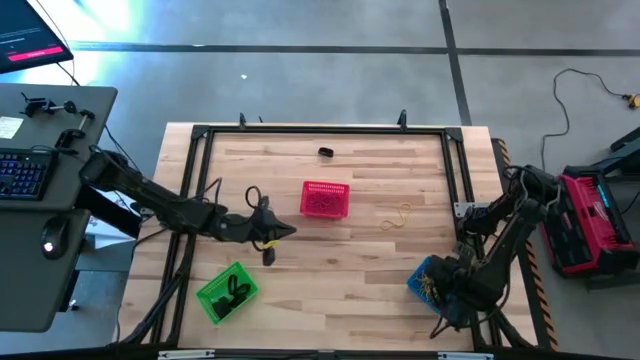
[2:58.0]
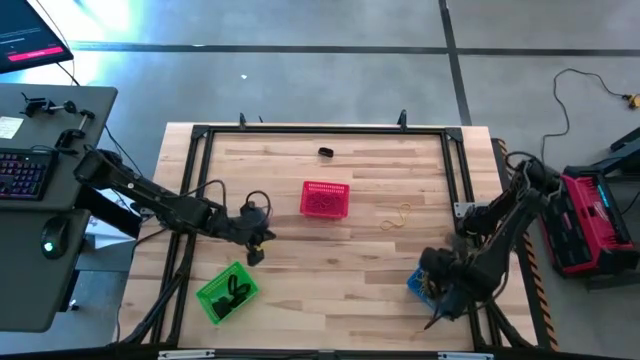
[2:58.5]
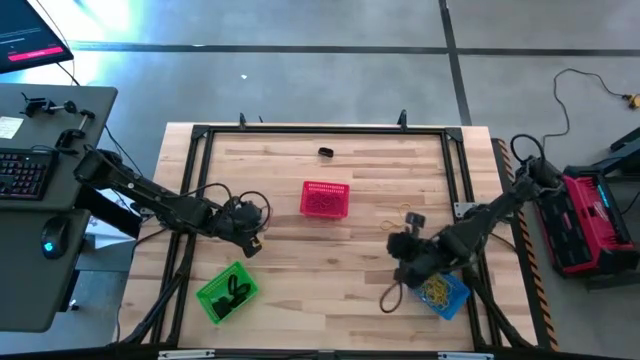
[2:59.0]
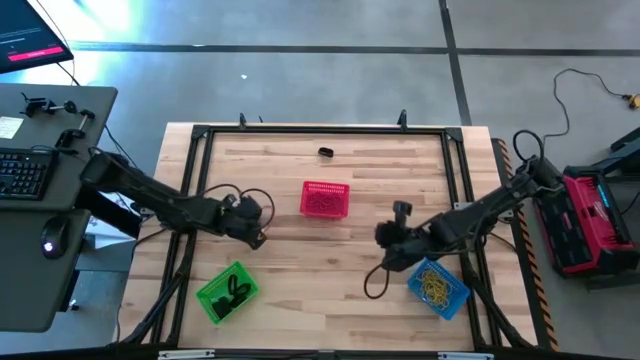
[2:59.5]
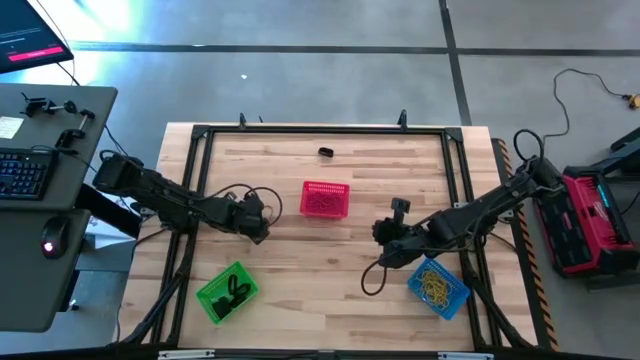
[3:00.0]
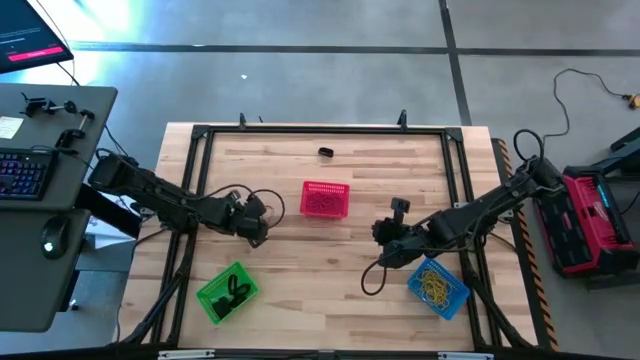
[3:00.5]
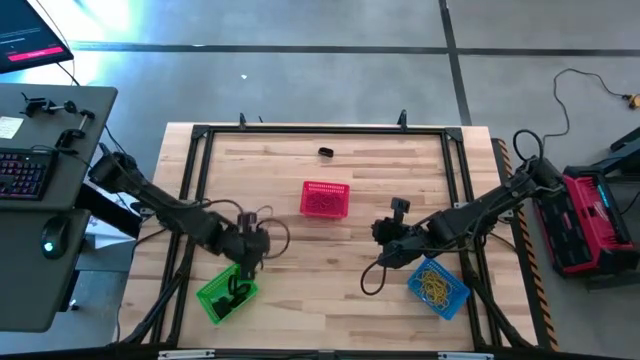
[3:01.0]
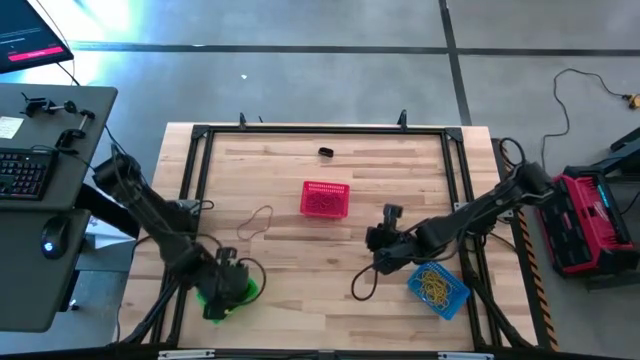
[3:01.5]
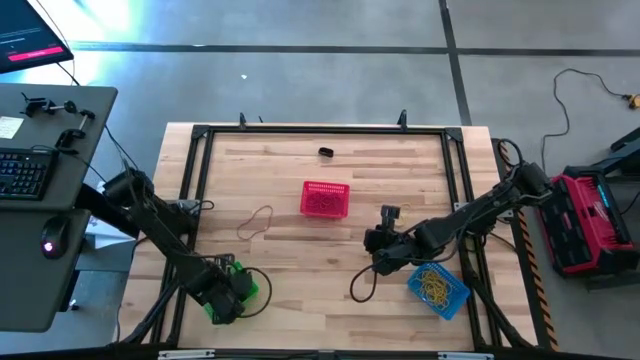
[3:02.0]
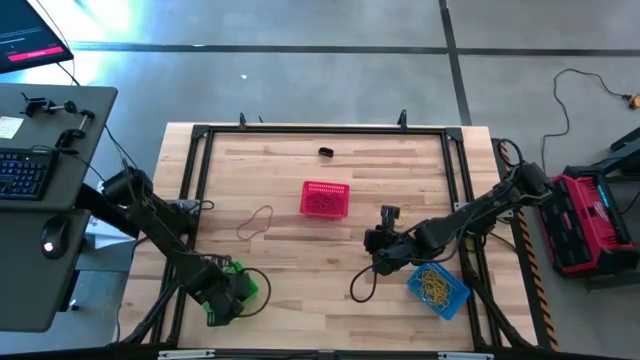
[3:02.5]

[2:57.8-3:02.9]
Task: Sort rubber bands into baskets
Put the black rubber band into the green bin

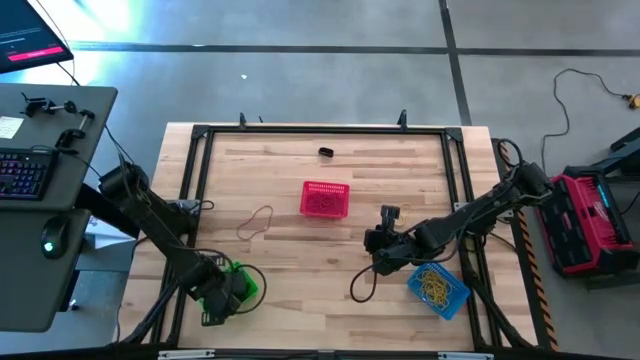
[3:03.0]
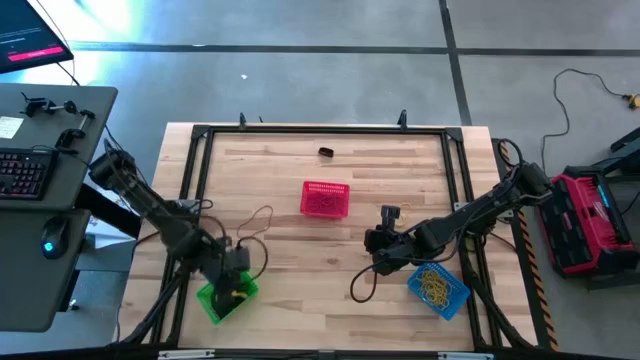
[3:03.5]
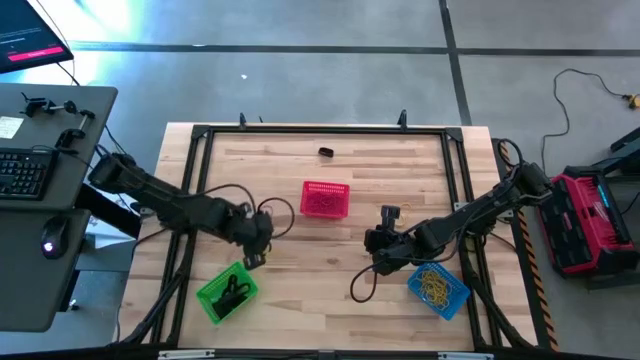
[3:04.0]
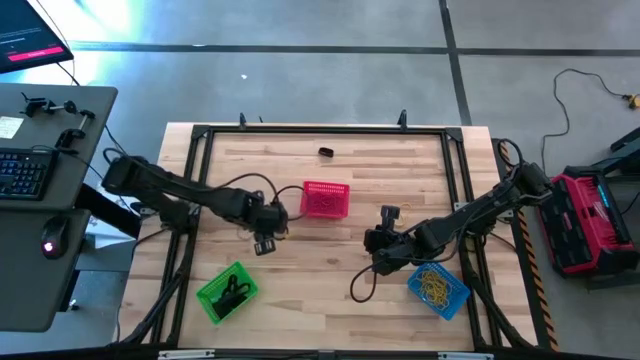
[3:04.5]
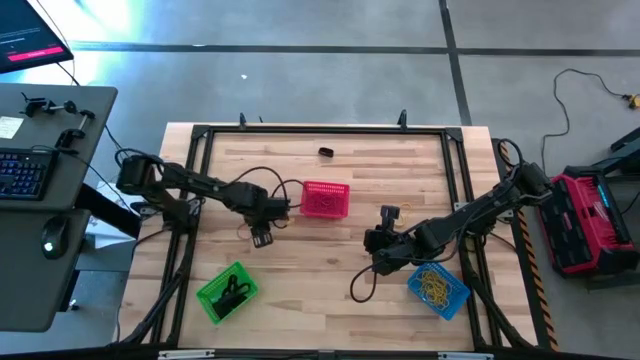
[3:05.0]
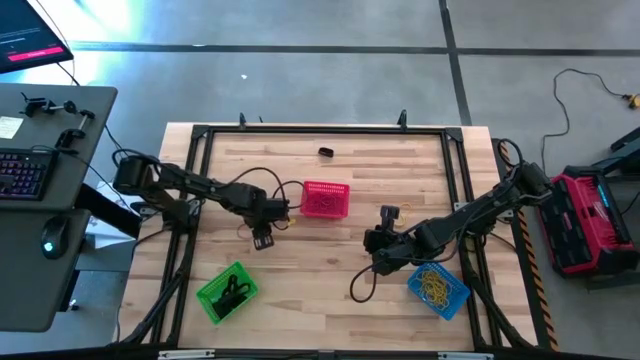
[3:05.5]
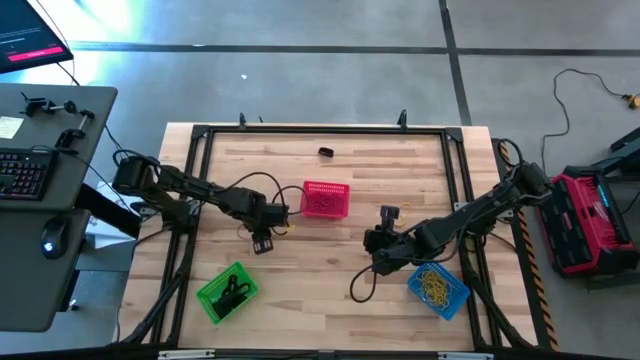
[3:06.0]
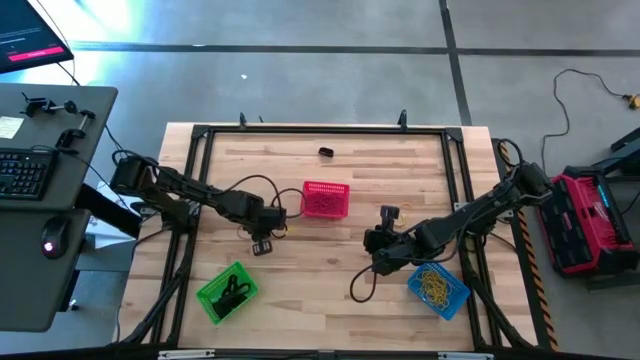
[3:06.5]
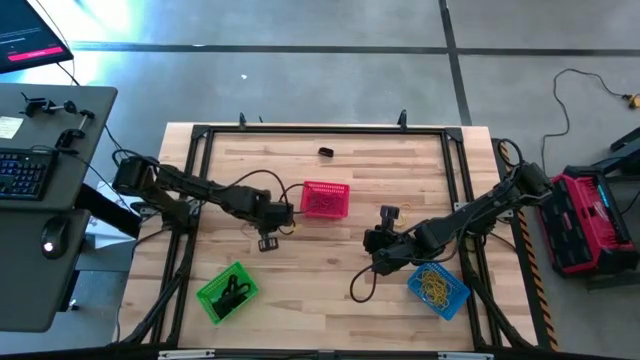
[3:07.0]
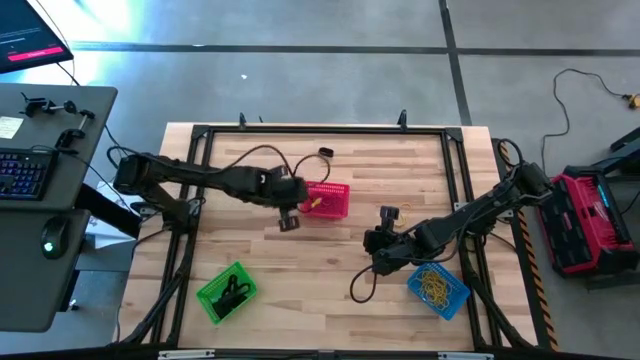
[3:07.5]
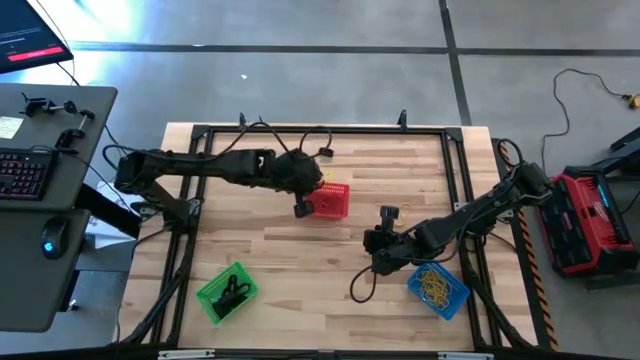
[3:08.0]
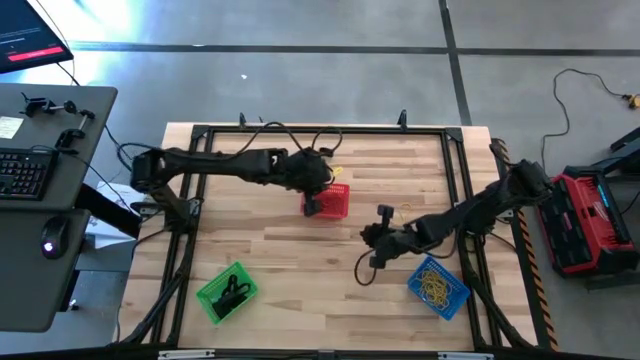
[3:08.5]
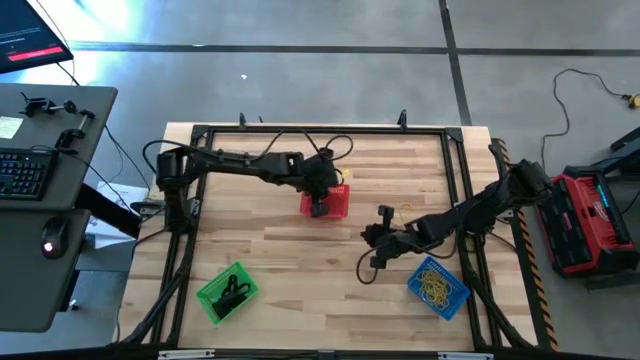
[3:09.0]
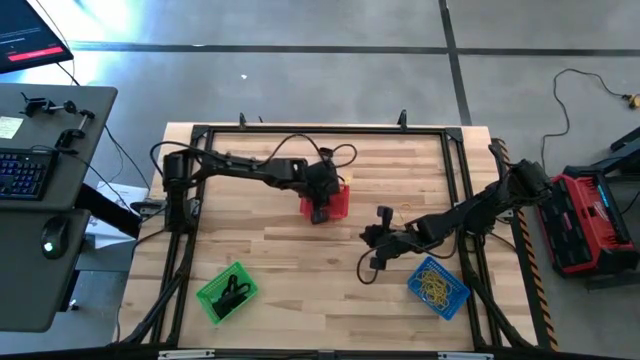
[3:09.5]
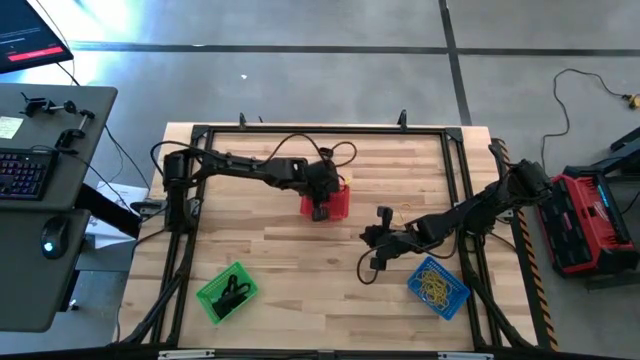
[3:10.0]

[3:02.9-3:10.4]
Put the red rubber band into the red bin

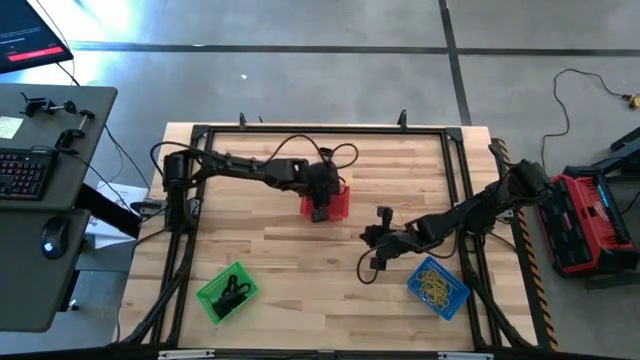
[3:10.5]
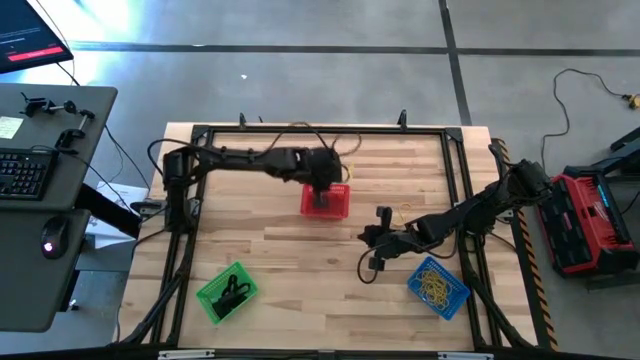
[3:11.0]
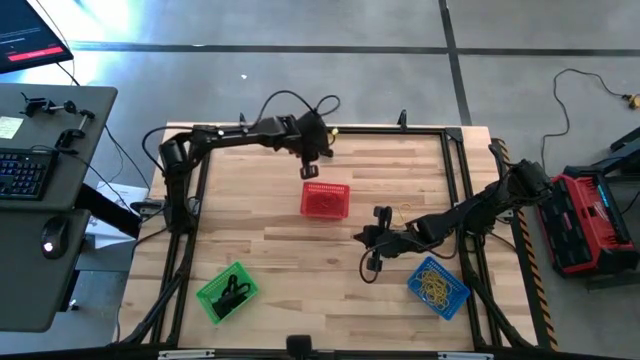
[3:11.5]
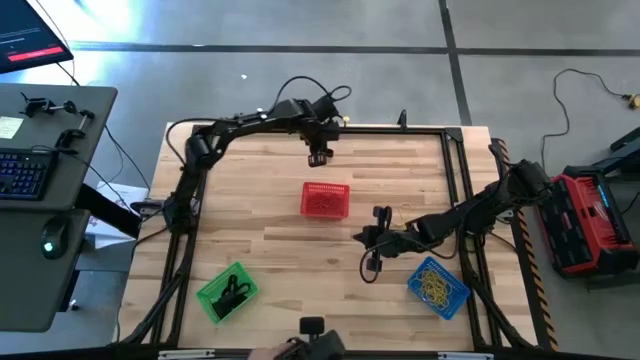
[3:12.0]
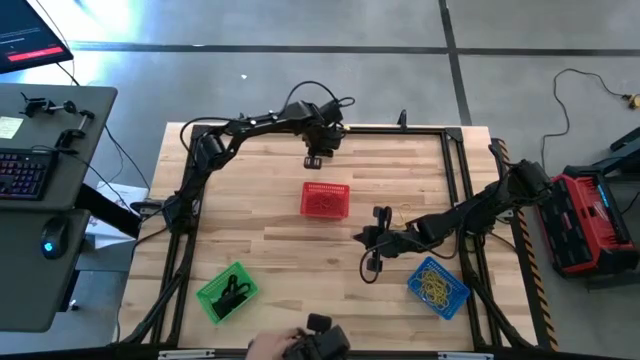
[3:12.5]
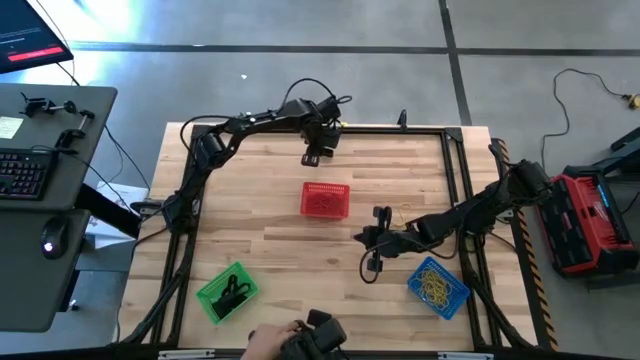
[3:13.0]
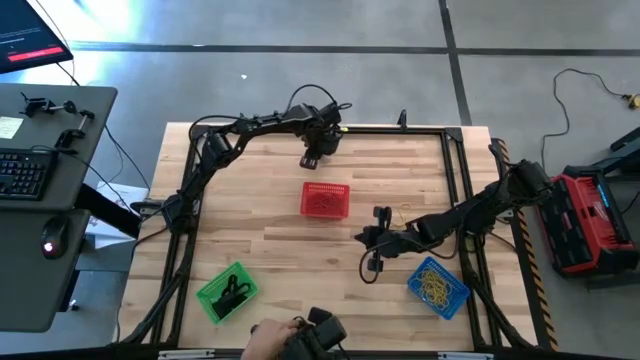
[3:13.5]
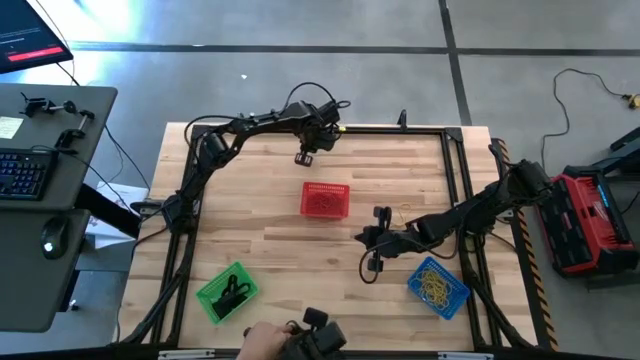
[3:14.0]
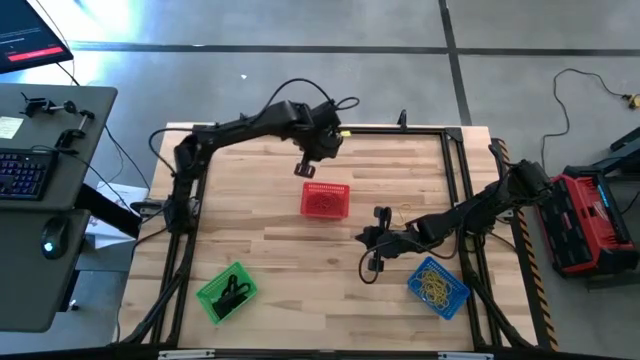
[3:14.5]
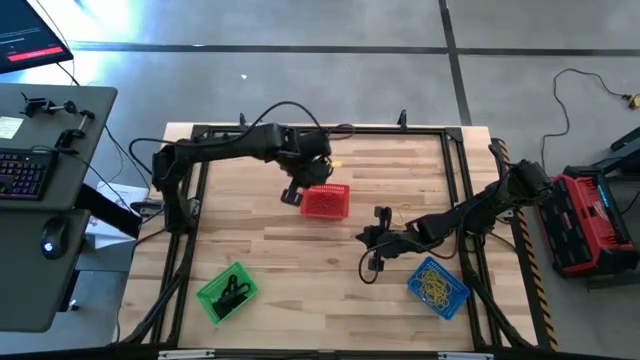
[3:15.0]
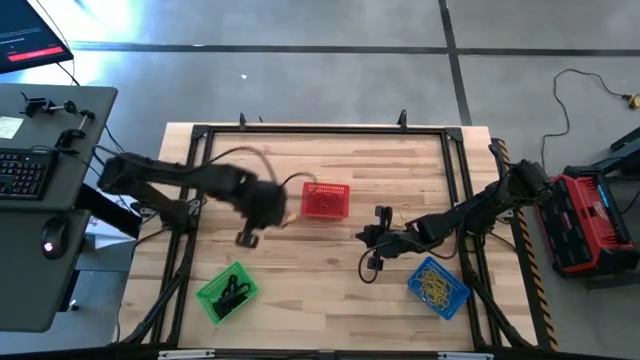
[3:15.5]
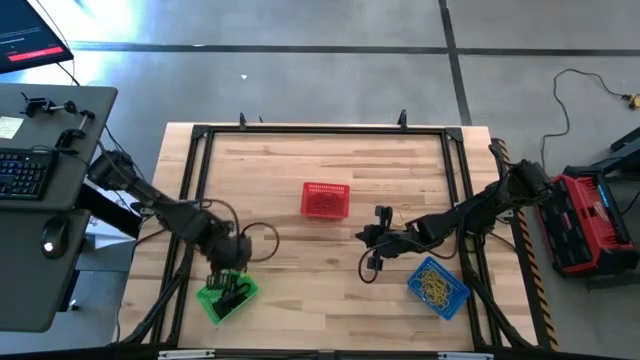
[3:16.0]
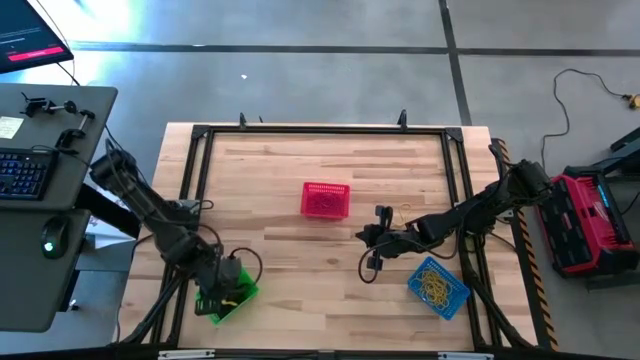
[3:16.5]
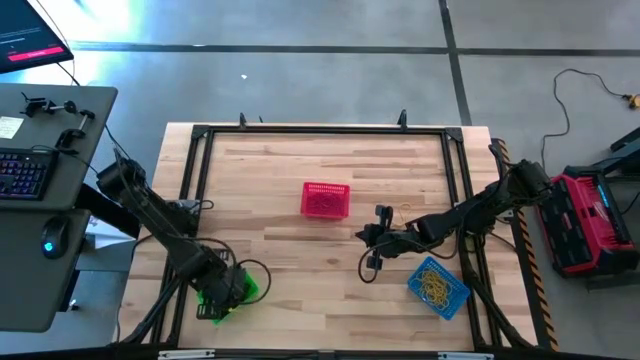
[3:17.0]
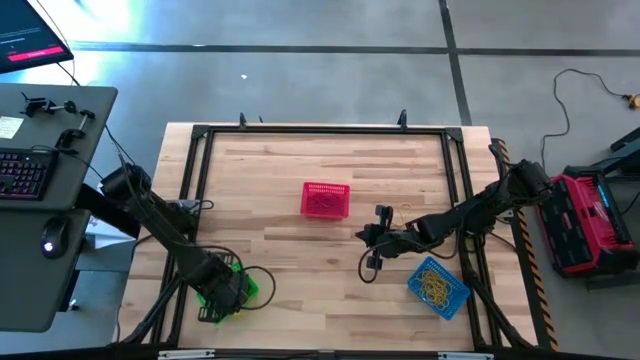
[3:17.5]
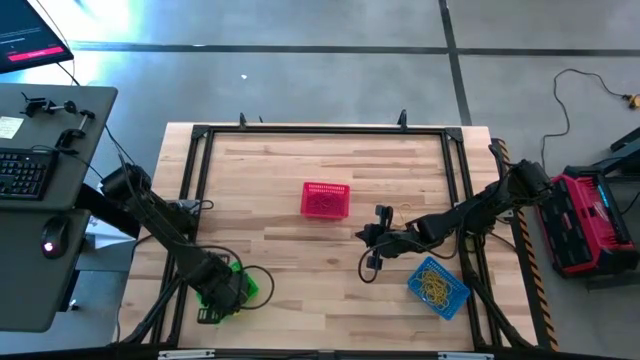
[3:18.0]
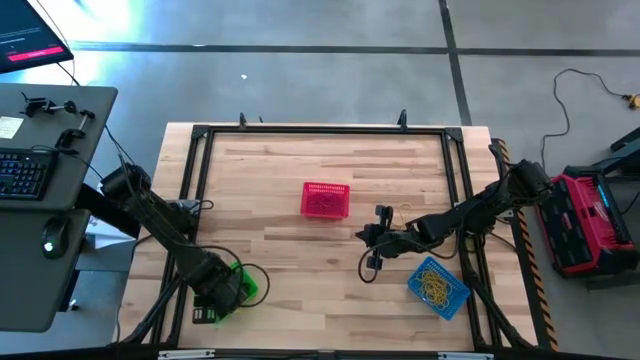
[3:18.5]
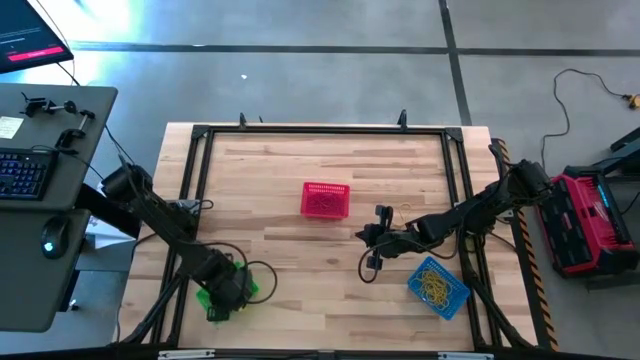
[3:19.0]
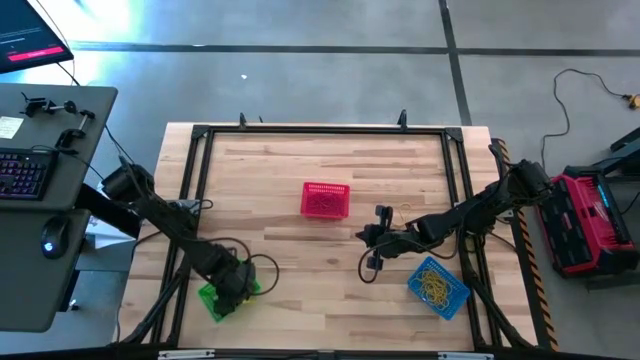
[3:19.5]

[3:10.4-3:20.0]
Put the black rubber band into the green bin
